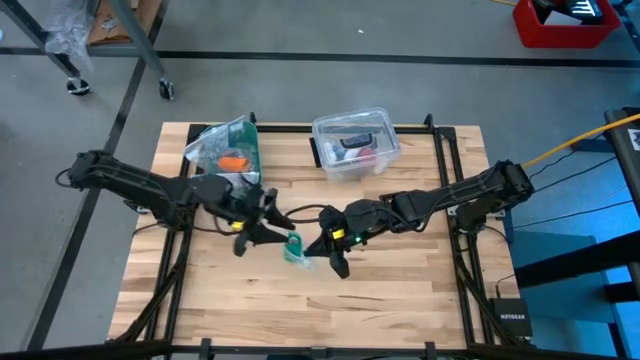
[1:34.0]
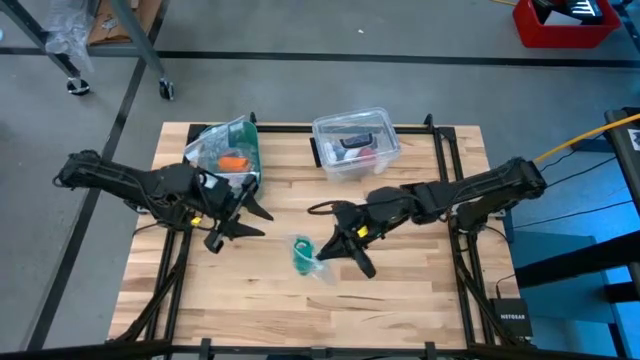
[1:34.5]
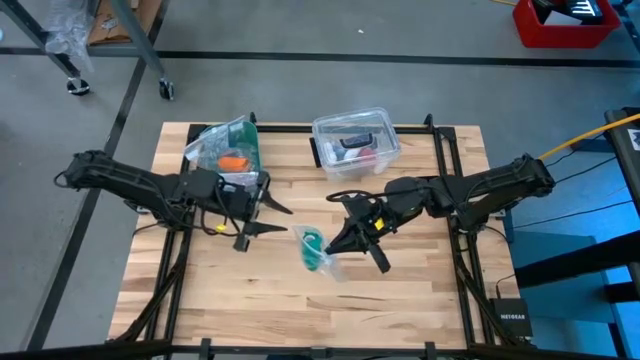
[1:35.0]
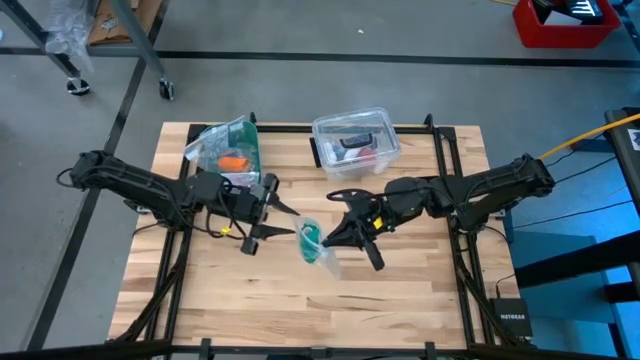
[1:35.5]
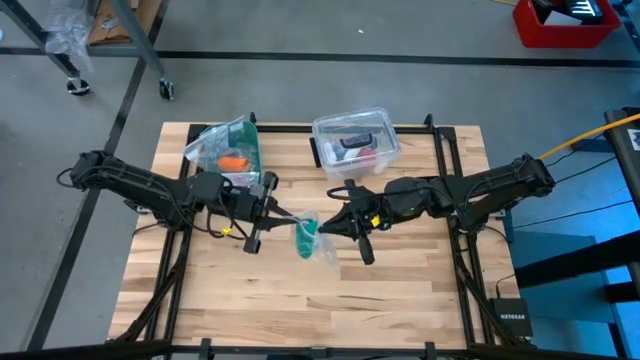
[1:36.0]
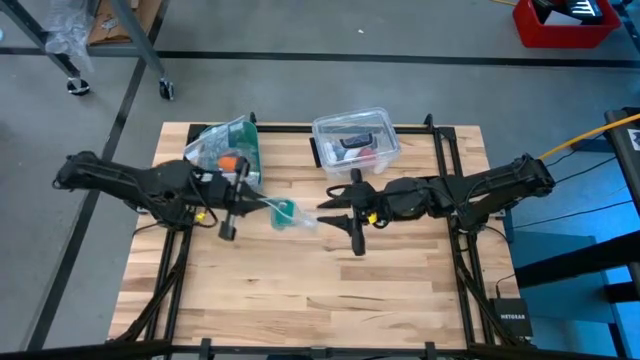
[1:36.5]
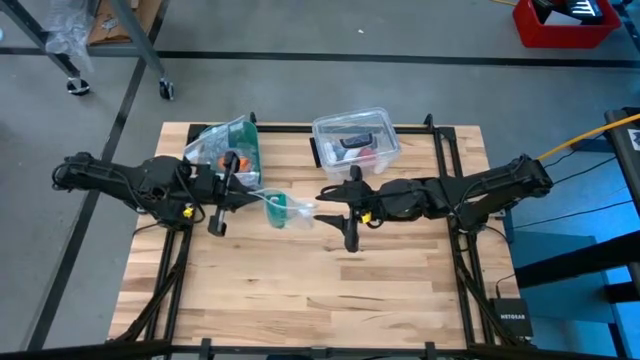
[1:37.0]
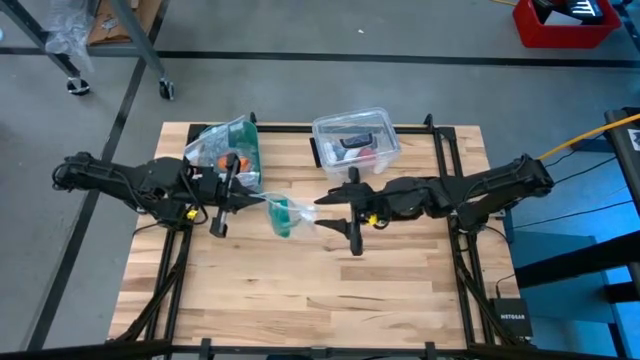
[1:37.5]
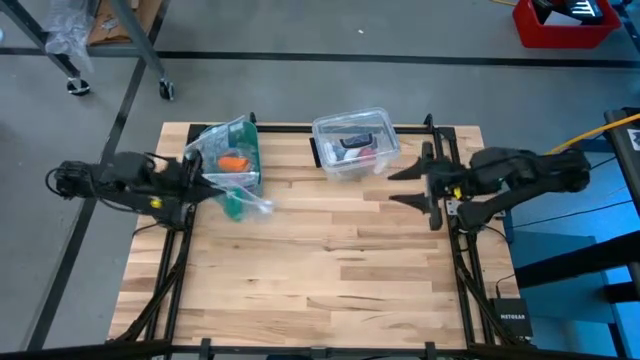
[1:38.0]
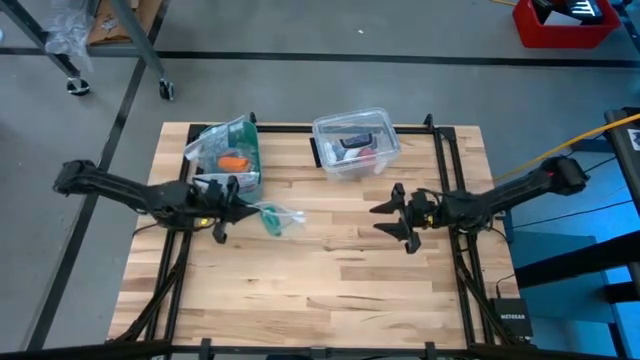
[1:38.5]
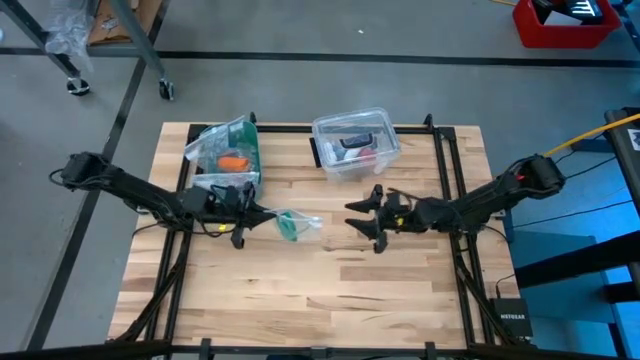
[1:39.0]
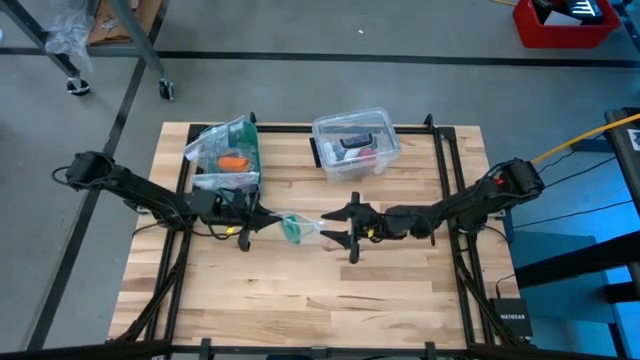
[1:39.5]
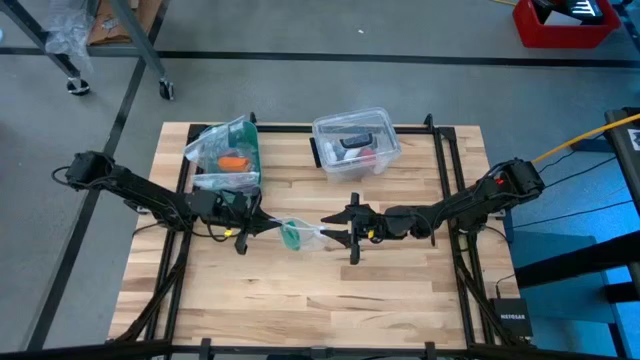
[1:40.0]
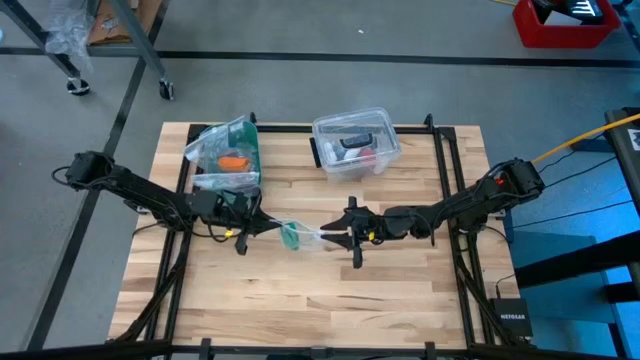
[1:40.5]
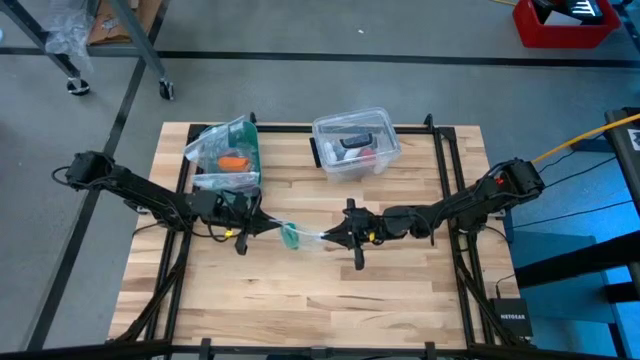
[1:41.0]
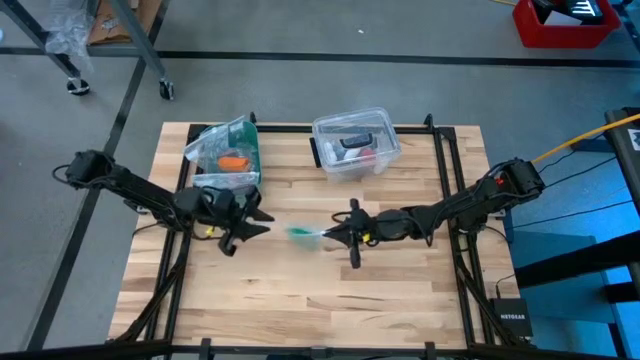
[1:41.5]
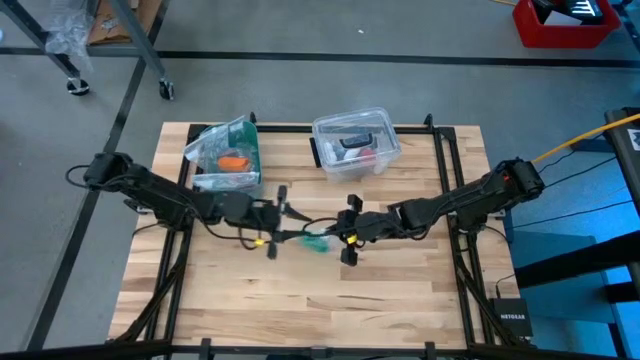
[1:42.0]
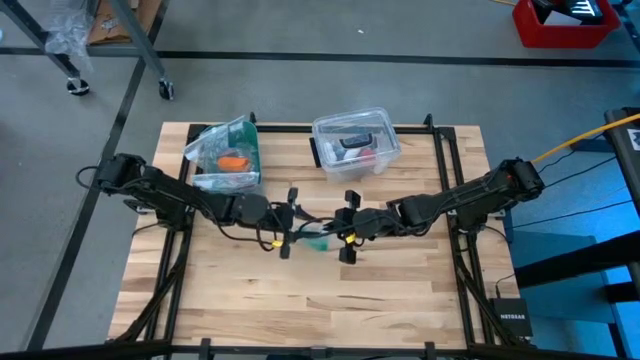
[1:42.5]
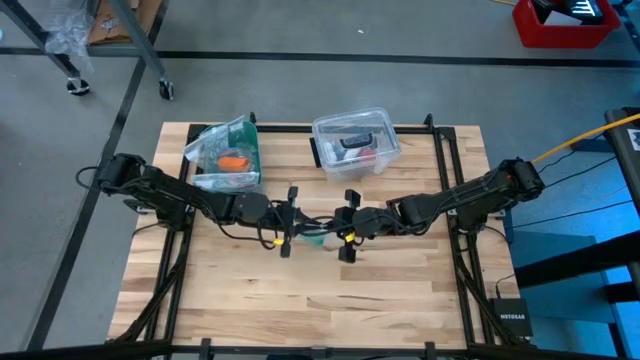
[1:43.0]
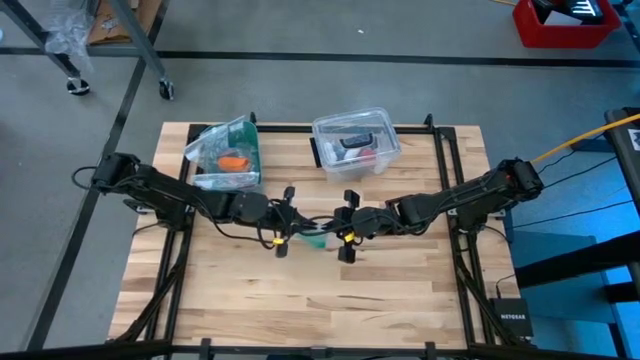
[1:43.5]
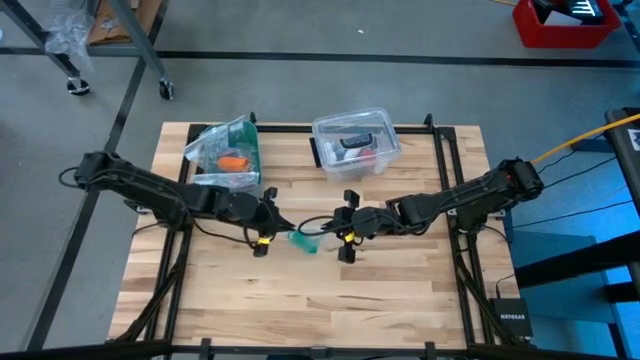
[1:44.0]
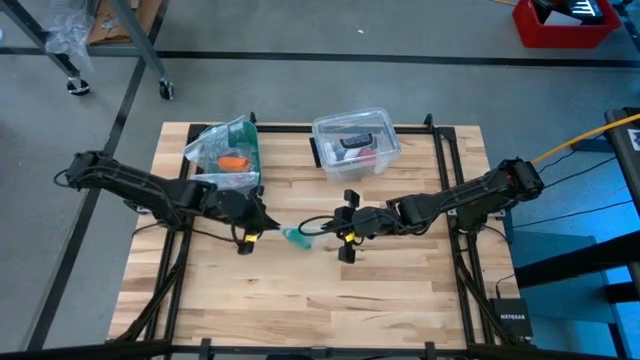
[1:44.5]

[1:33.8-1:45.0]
Task: Roll bandage
Close the transparent zip bag

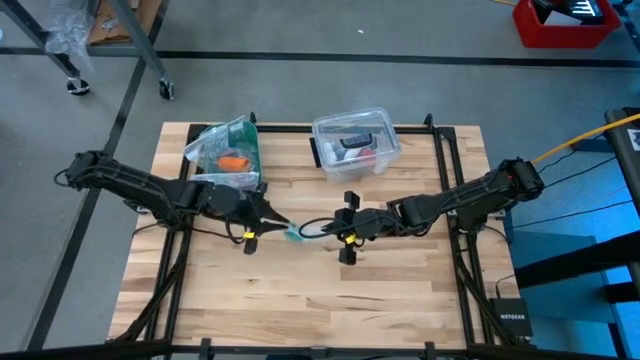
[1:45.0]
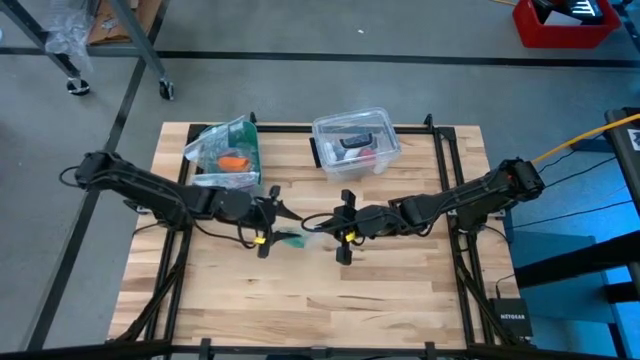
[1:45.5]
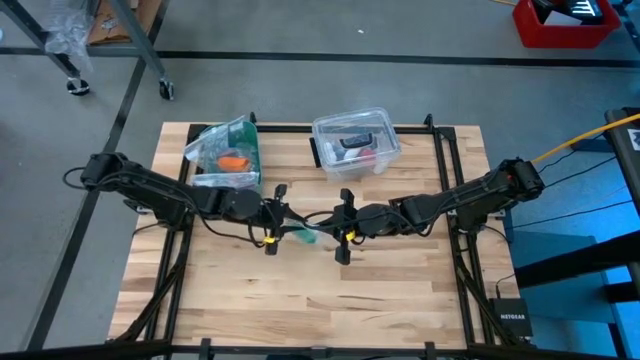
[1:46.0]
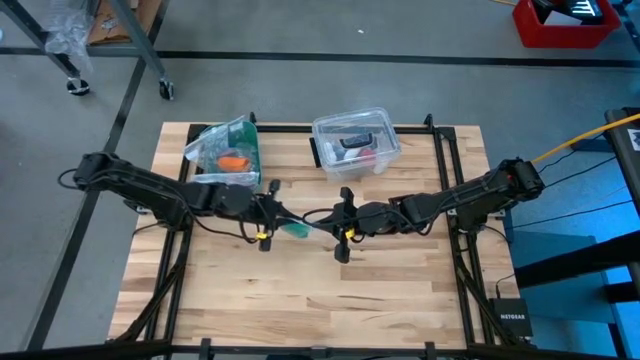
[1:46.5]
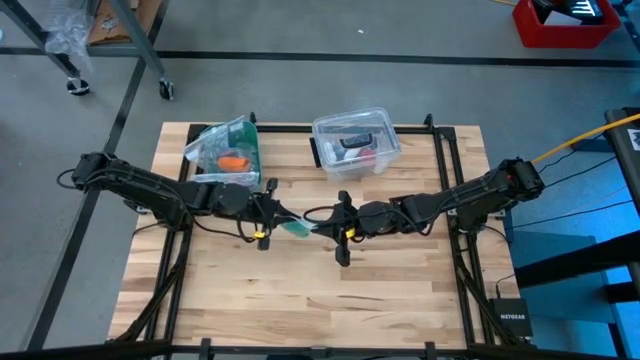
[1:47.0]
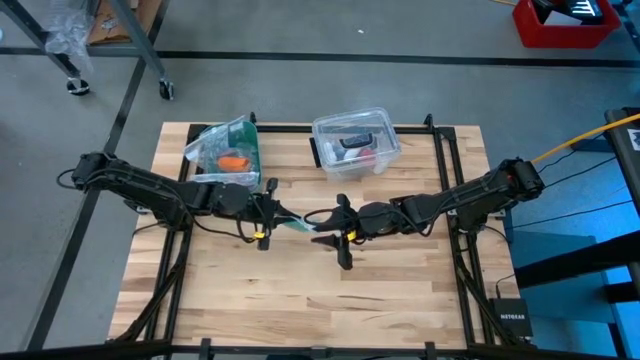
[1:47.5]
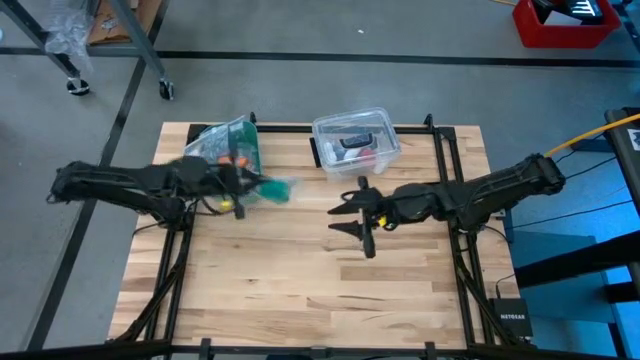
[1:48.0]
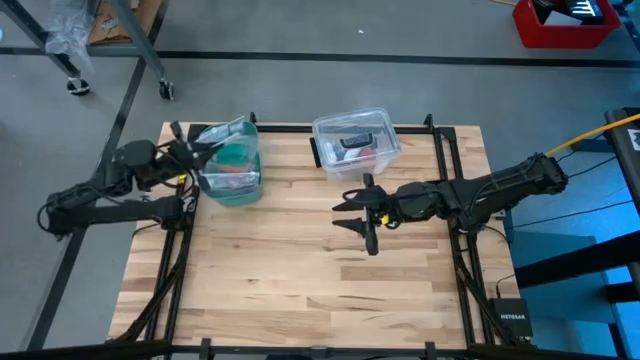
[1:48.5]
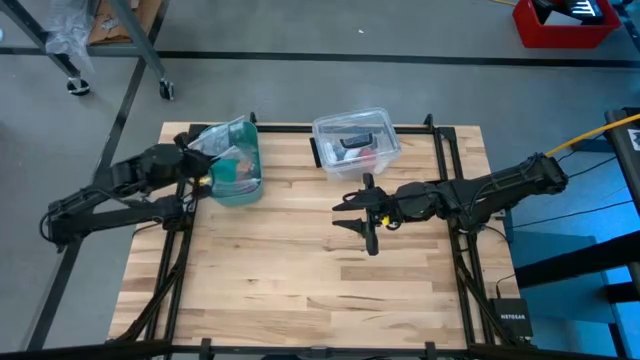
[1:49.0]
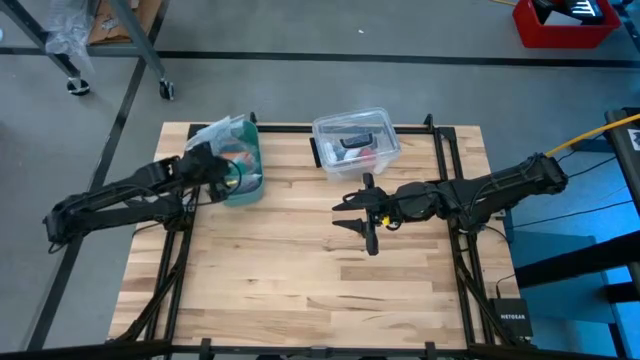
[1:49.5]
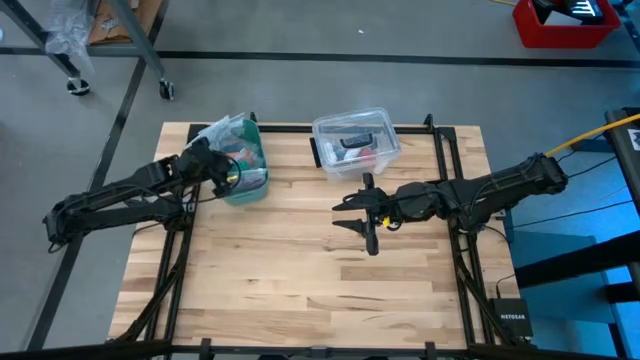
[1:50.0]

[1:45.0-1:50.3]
Put the transparent zip bag into the green bin

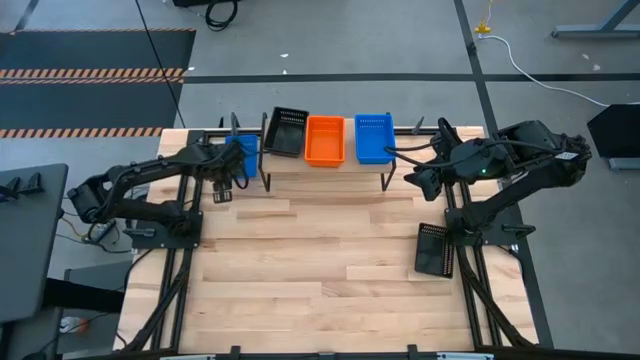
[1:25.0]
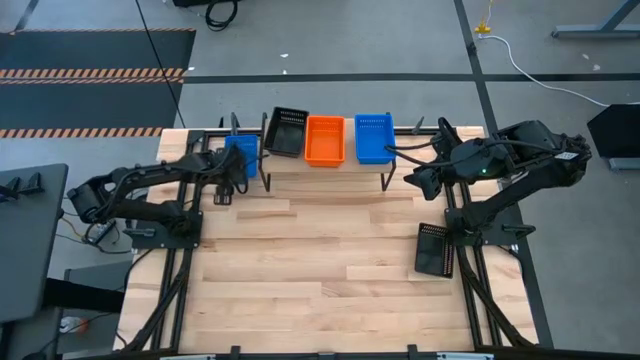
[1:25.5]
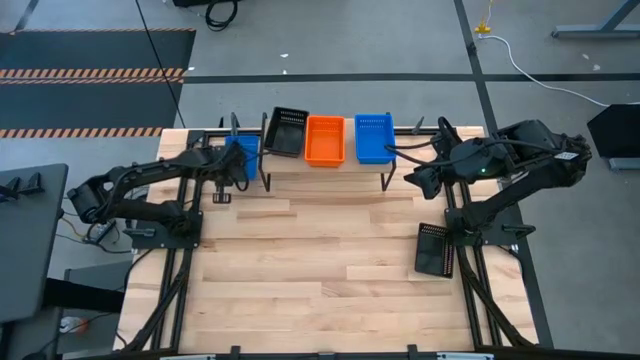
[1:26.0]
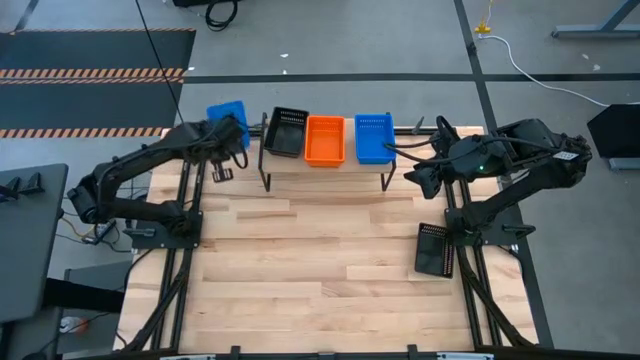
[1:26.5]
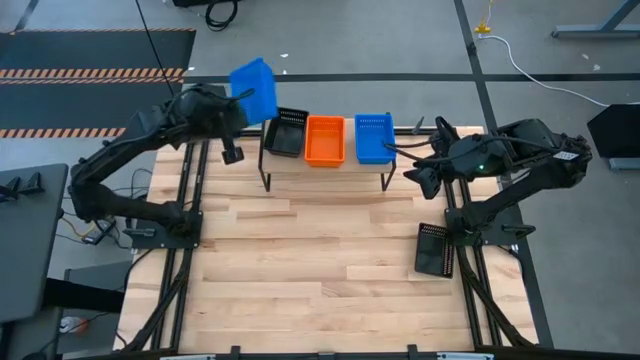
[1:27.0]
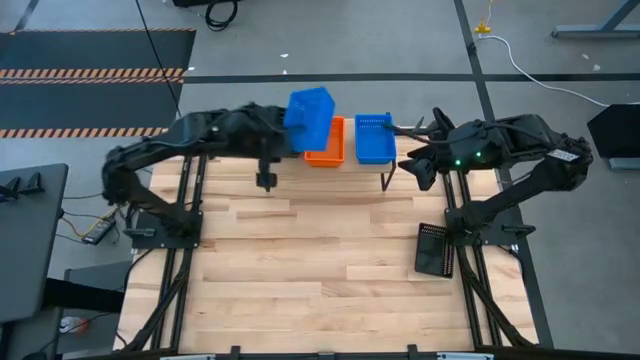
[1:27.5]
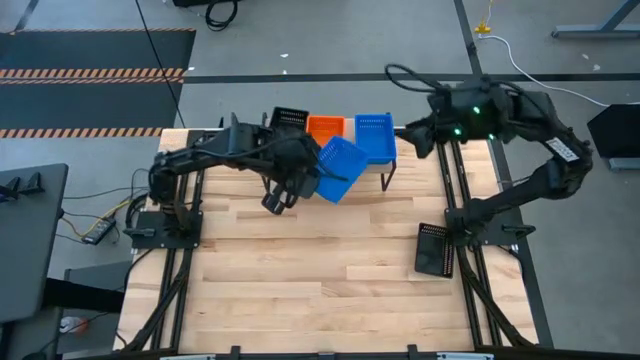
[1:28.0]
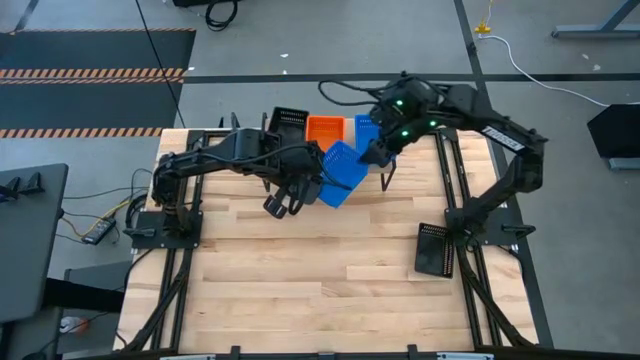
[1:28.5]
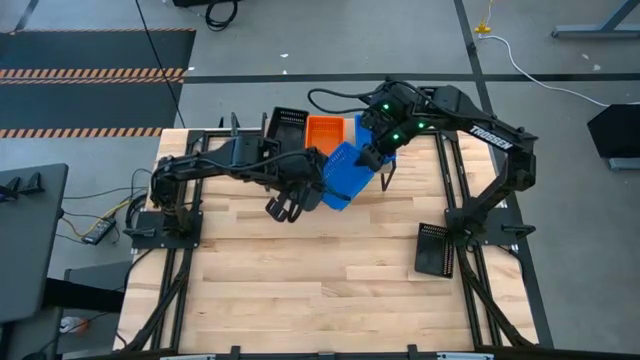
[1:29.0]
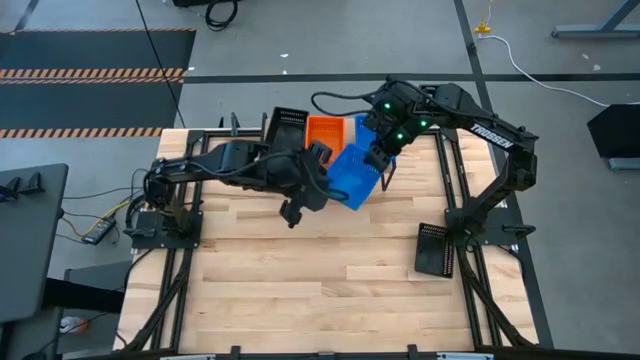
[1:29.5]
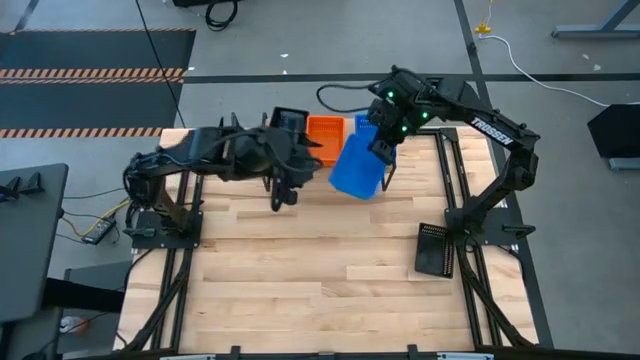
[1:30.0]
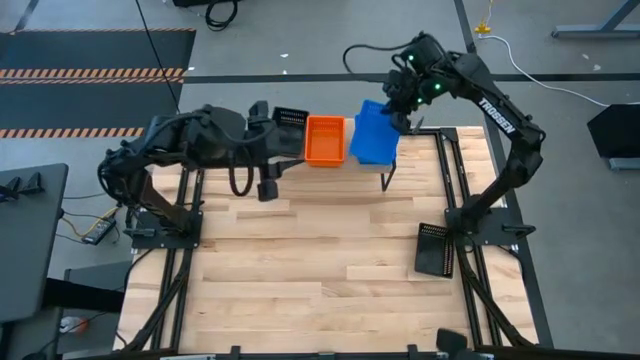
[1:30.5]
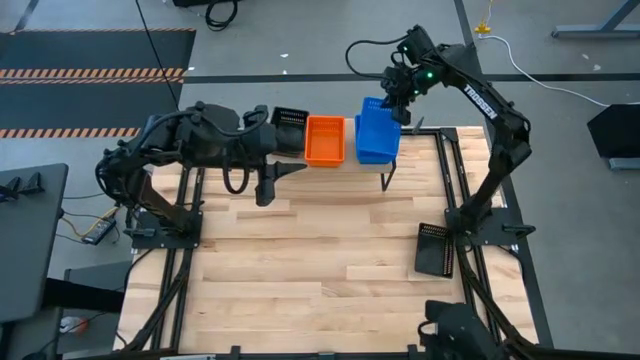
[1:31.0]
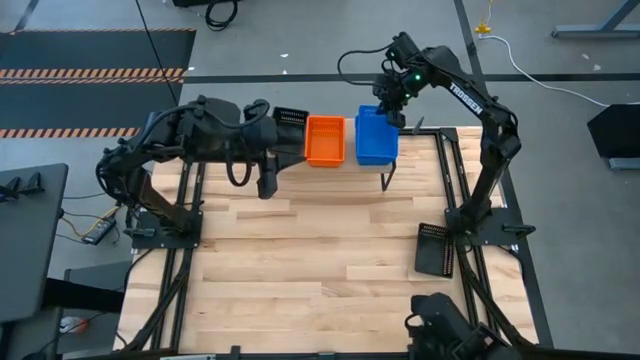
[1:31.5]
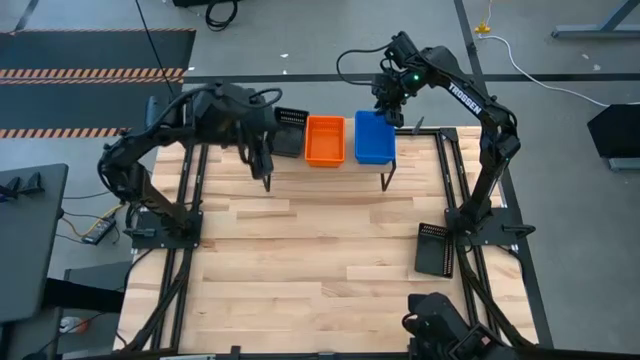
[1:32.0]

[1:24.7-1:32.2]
Task: Stack baskets on shelf by color
Stack the blue bin on top of the blue bin on the shelf
